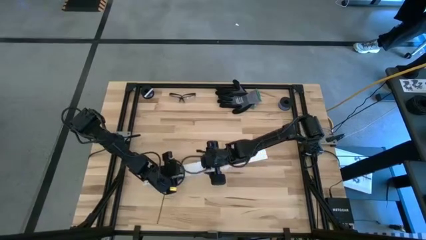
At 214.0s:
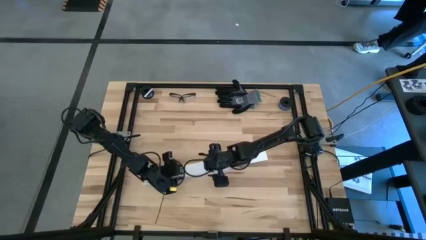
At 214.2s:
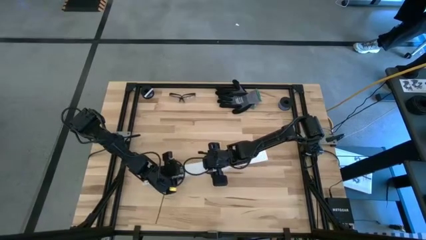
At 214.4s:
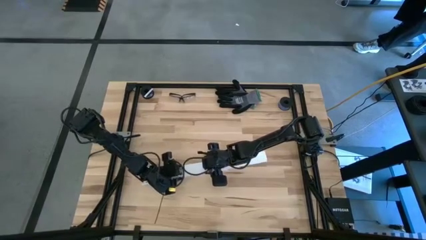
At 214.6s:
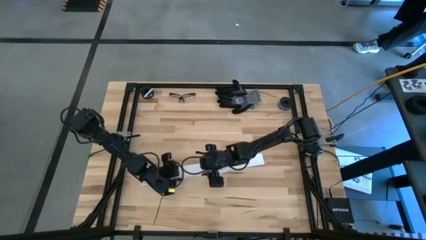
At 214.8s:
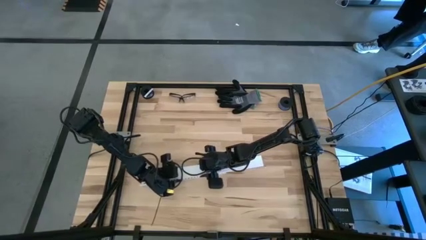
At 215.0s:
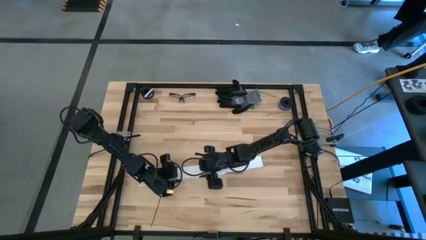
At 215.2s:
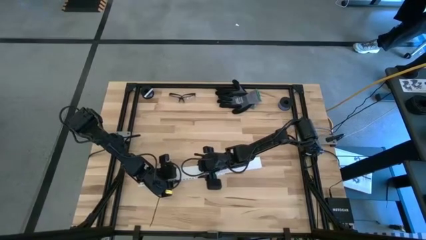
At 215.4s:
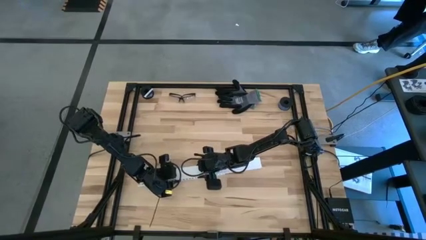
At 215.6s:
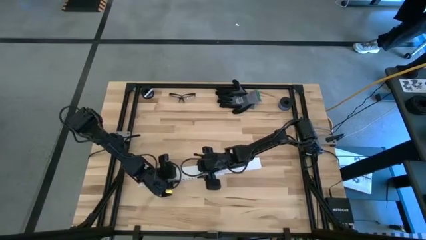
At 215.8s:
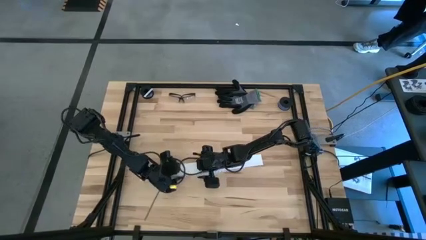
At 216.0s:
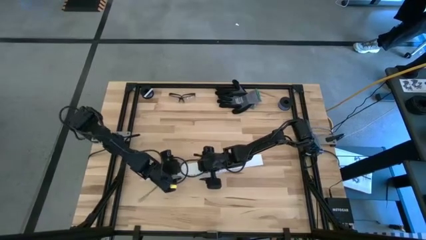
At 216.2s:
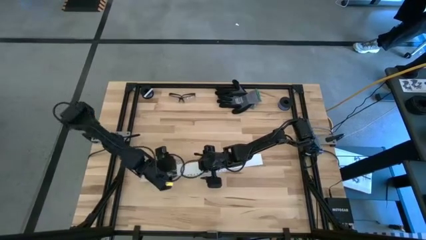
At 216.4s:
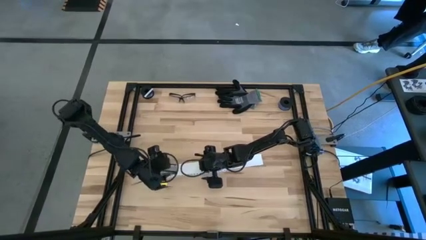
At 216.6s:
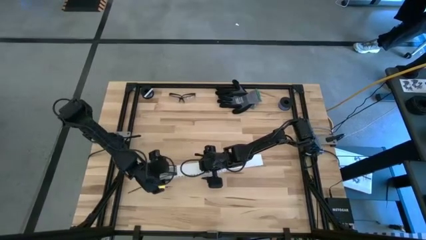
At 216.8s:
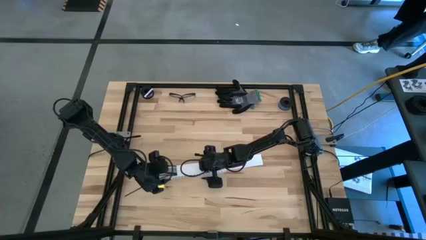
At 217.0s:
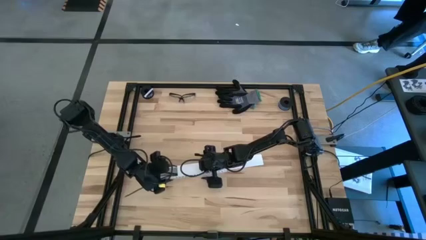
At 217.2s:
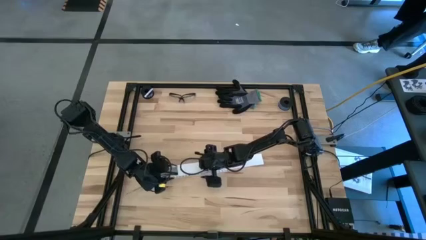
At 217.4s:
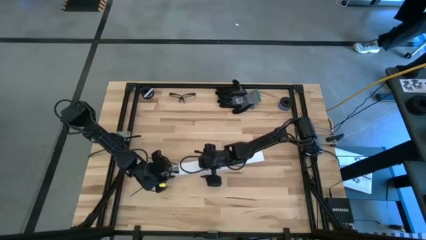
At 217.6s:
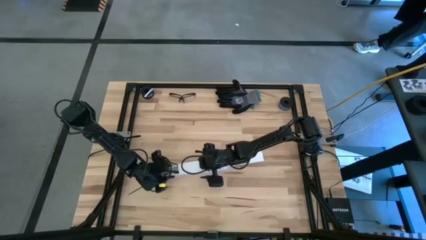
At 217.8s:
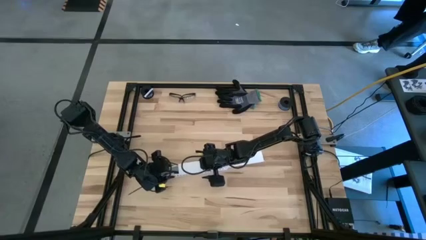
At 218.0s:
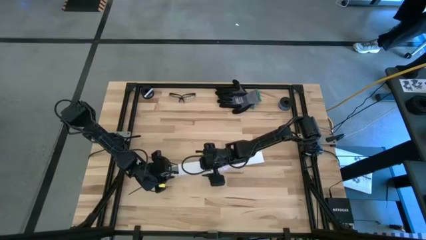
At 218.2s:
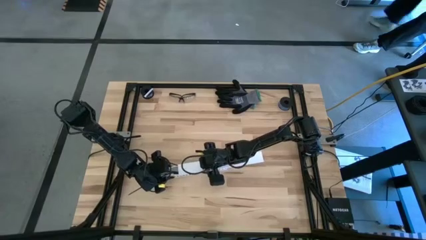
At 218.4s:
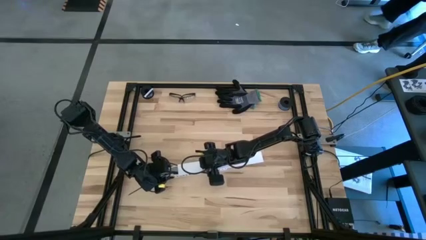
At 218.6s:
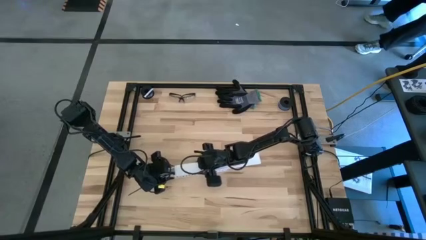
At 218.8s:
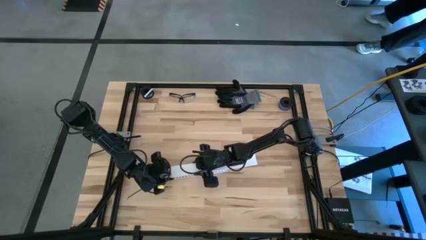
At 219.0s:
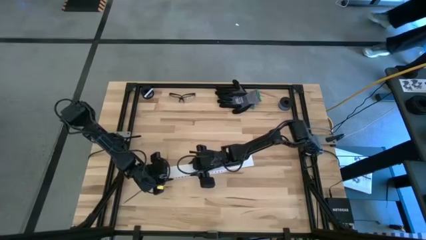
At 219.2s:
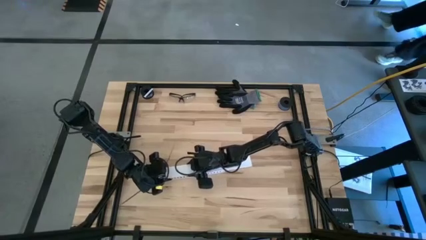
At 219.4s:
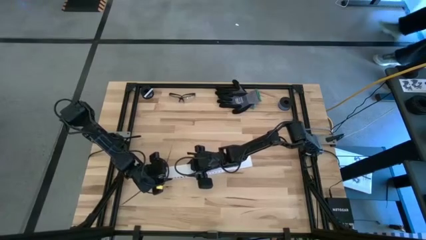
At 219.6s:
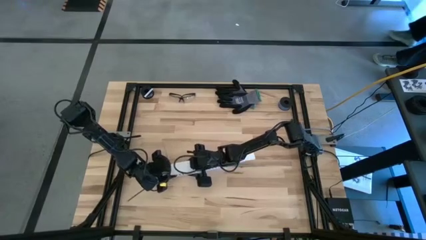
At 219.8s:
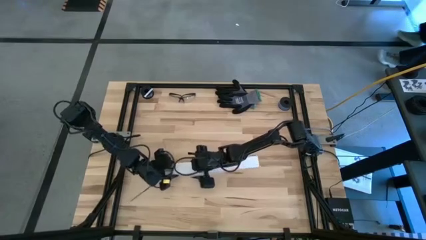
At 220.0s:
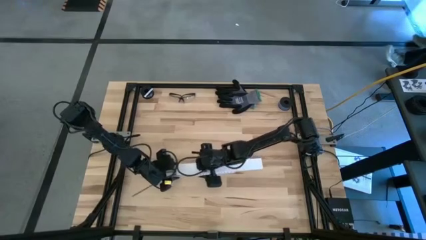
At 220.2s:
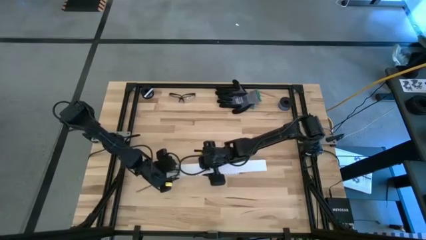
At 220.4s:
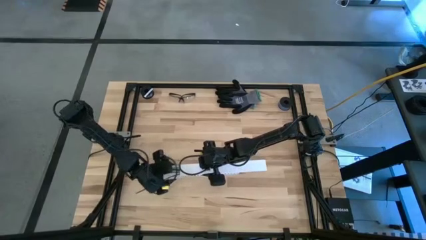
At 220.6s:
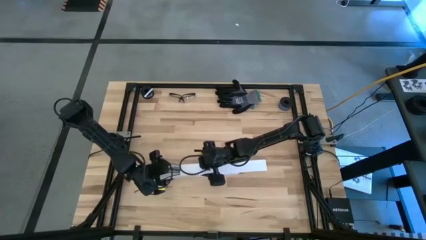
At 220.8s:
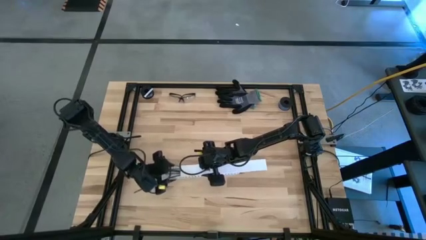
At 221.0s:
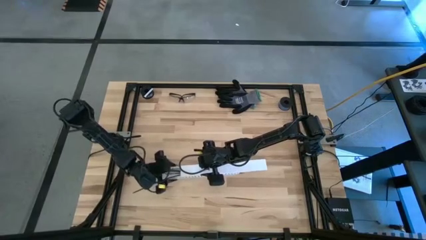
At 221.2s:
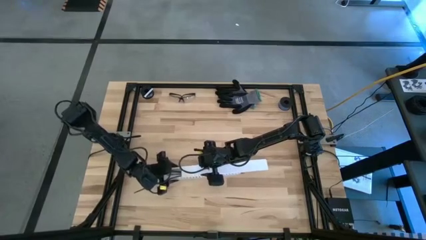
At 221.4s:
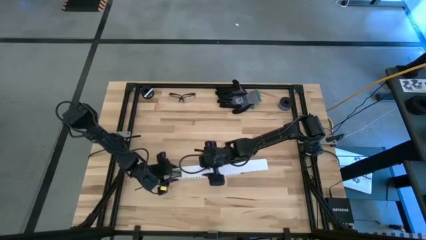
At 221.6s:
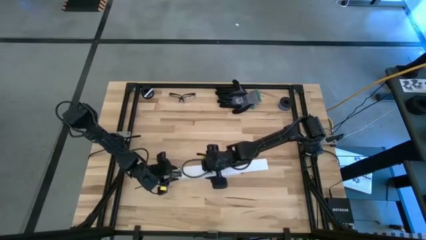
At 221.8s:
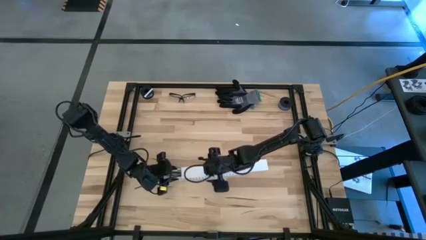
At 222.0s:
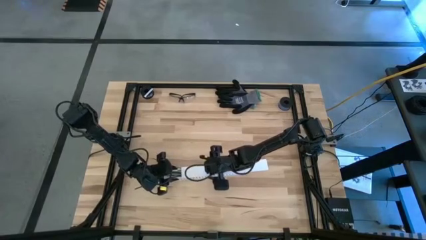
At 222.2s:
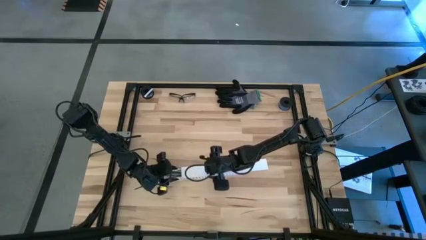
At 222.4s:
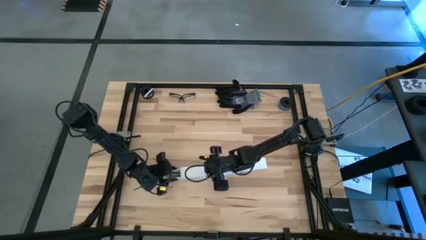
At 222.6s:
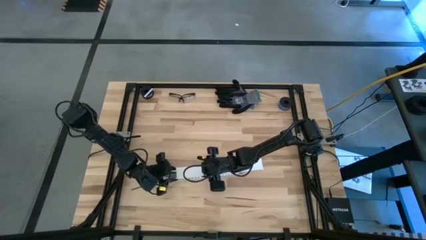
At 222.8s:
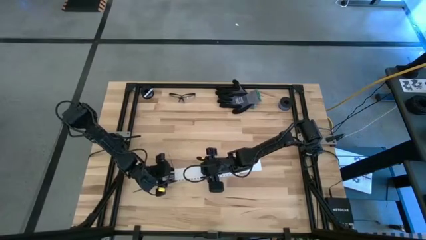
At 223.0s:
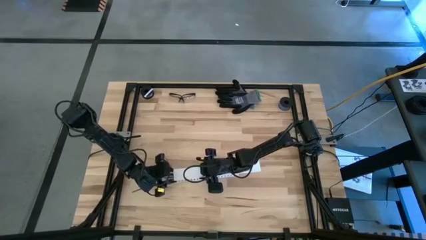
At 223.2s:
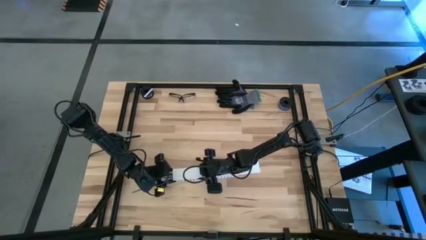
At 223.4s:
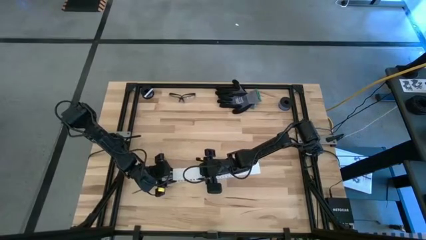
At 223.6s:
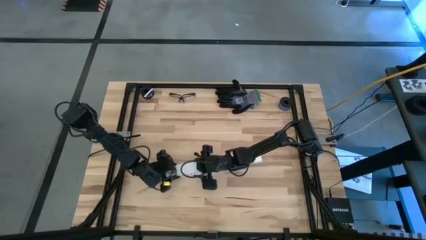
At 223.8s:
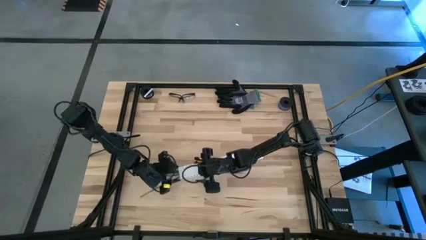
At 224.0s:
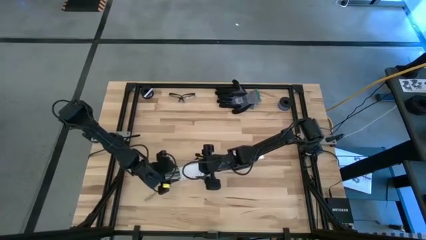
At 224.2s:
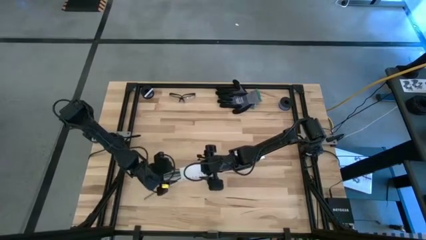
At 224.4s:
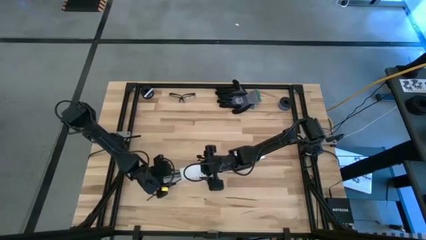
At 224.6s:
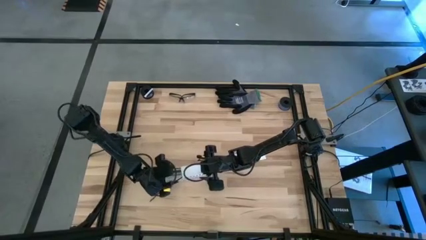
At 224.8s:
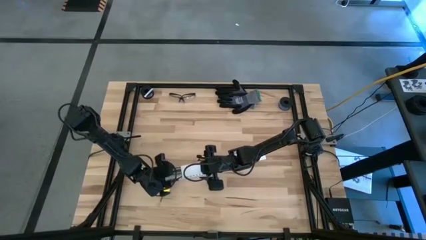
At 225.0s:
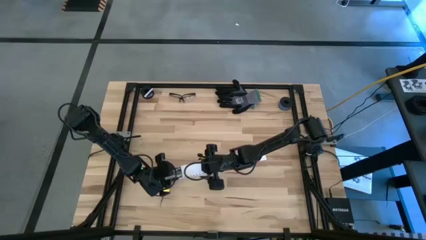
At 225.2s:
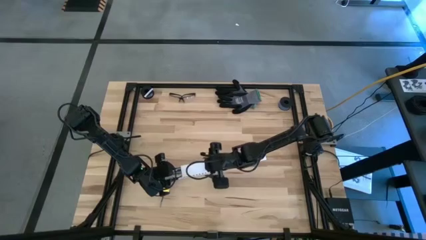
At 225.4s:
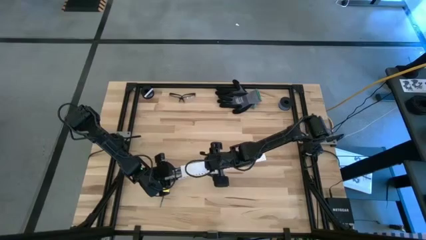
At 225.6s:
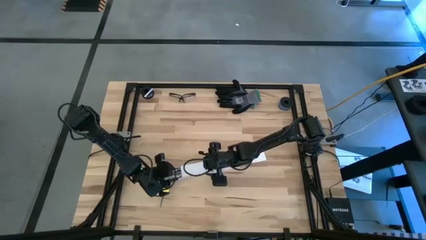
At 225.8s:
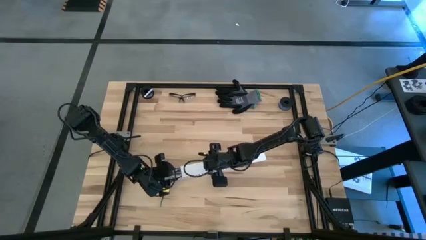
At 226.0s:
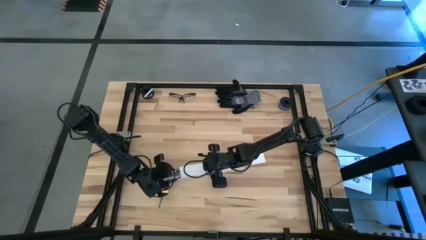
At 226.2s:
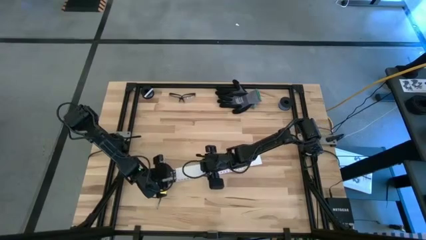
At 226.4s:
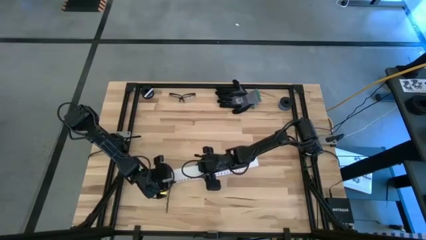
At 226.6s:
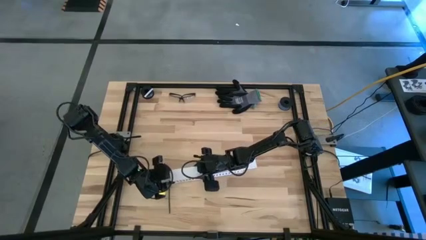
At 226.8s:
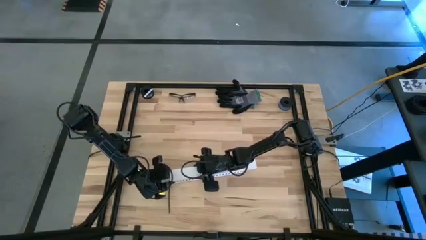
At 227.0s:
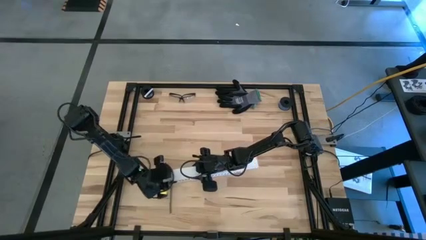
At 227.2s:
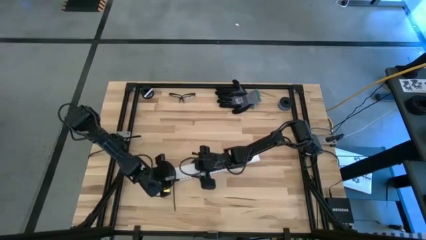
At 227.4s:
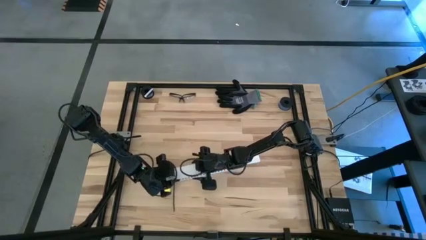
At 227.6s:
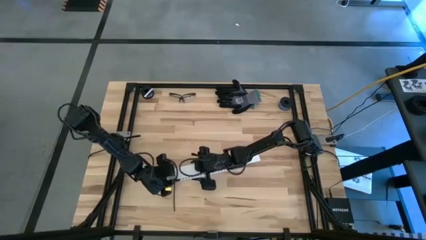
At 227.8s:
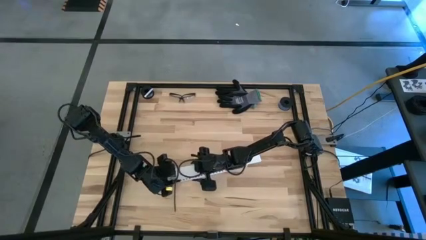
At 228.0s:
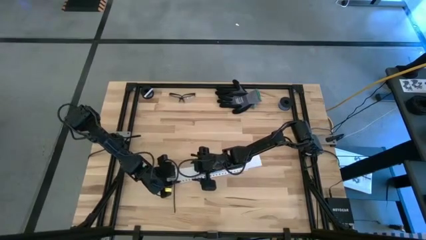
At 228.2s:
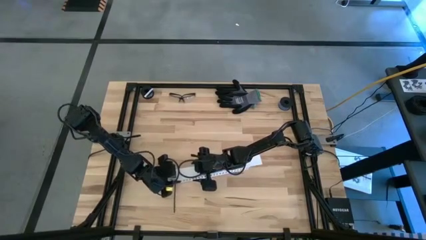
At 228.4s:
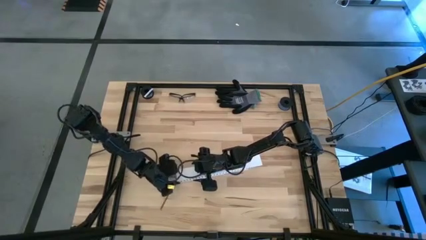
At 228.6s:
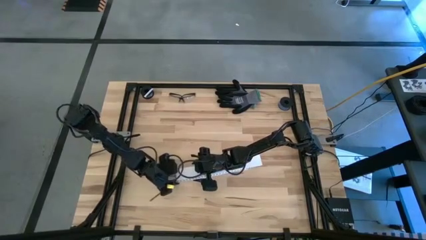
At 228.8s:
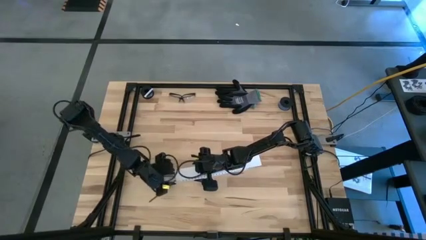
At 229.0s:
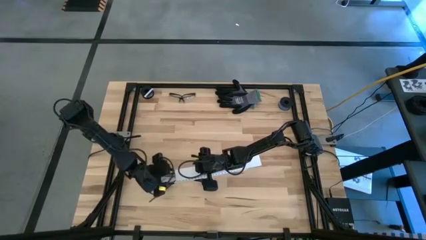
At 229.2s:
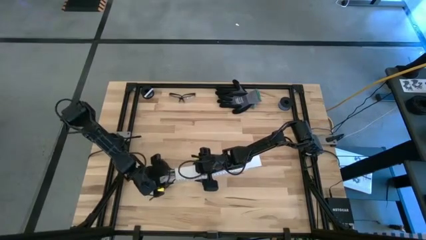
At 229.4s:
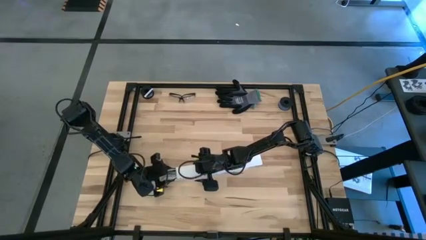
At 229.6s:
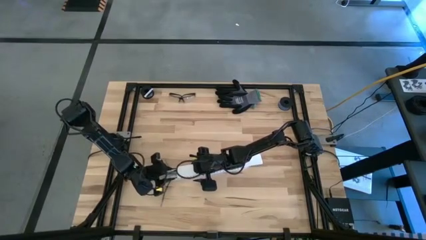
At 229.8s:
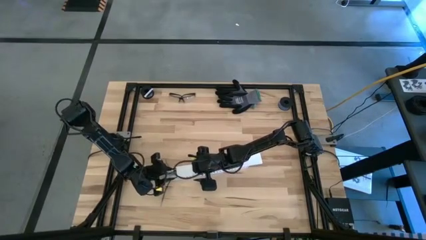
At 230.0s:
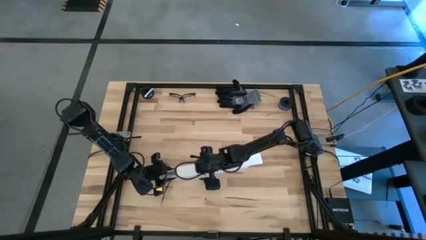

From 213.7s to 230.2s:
Task: Ziptie cables
Close the white cable duct
